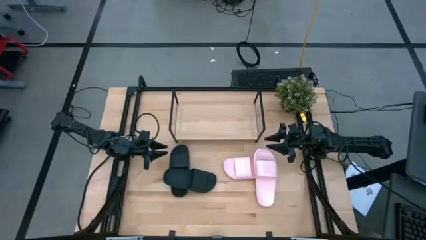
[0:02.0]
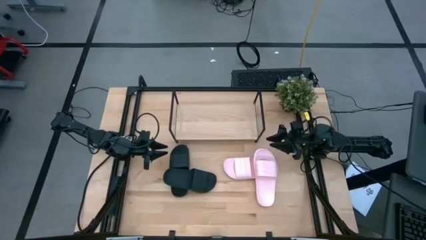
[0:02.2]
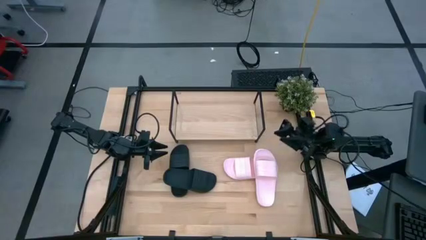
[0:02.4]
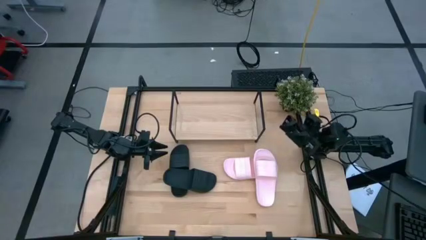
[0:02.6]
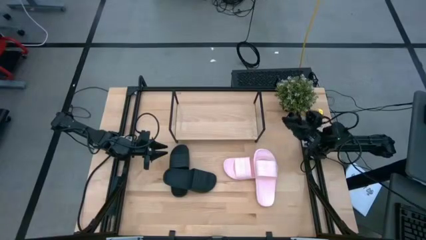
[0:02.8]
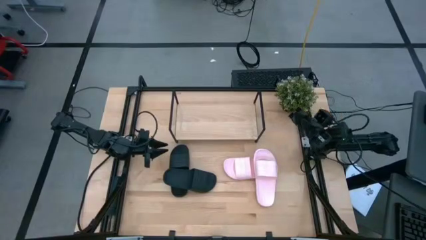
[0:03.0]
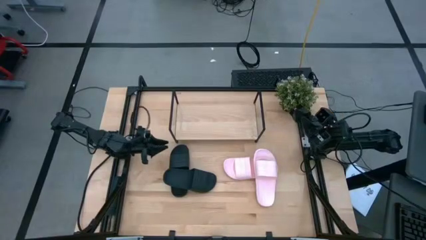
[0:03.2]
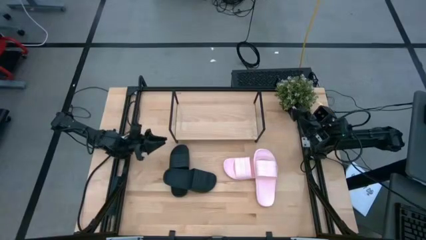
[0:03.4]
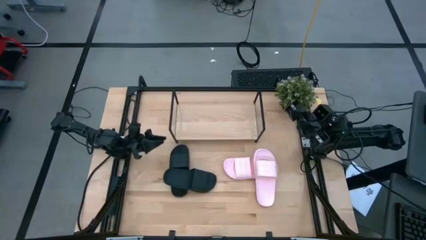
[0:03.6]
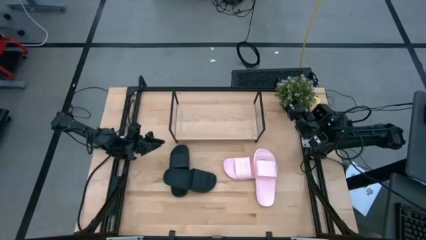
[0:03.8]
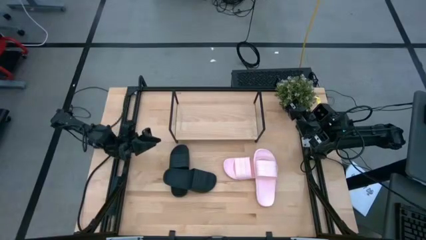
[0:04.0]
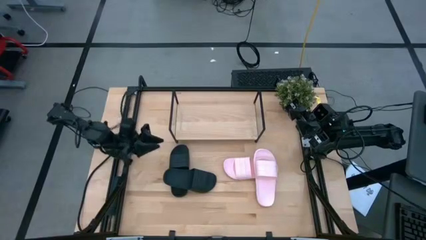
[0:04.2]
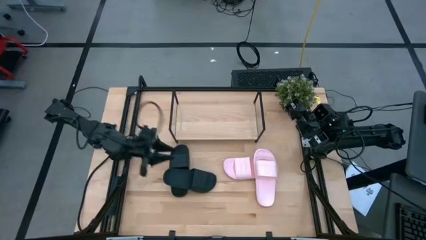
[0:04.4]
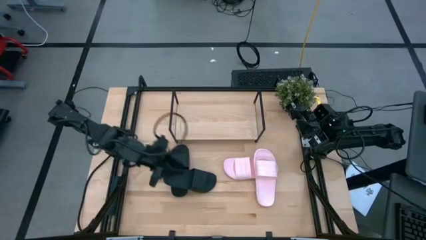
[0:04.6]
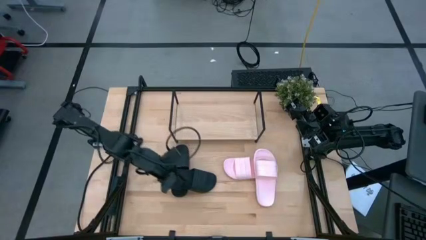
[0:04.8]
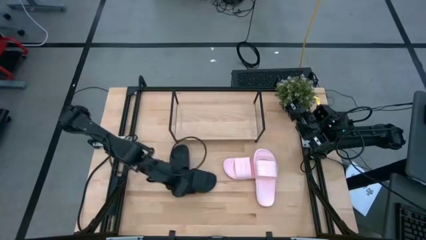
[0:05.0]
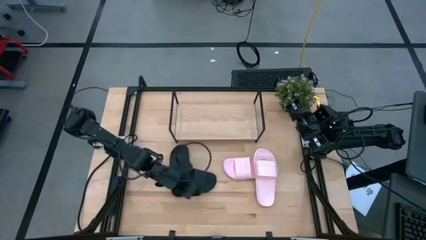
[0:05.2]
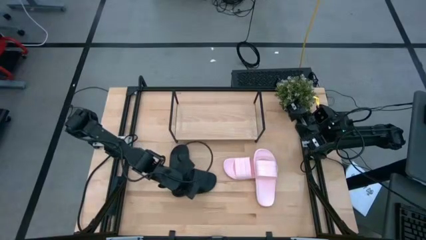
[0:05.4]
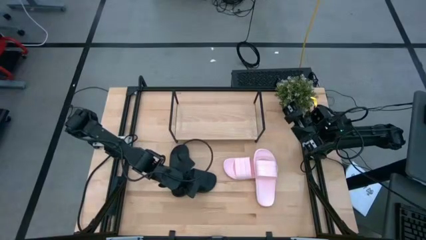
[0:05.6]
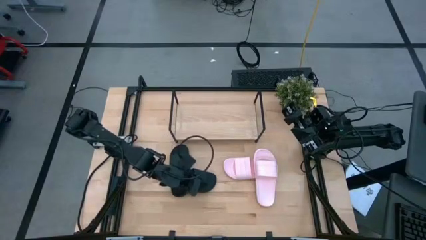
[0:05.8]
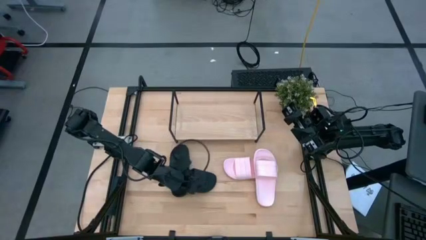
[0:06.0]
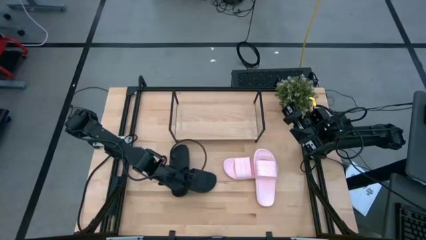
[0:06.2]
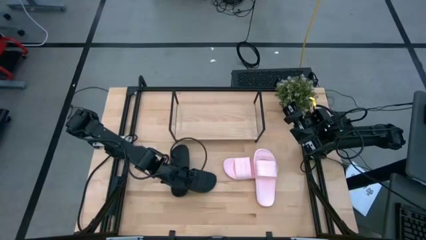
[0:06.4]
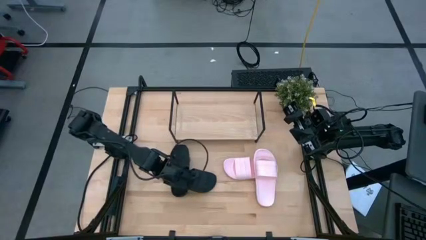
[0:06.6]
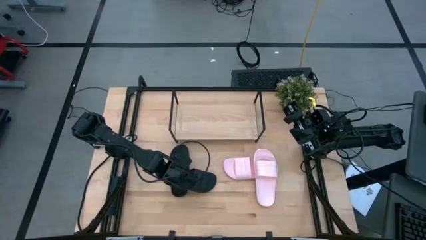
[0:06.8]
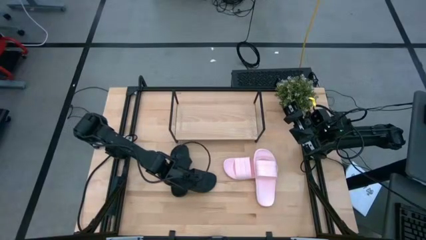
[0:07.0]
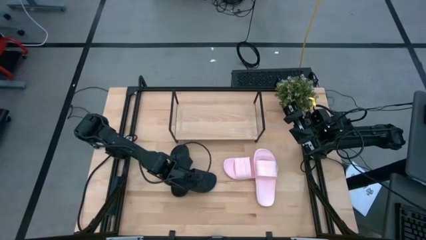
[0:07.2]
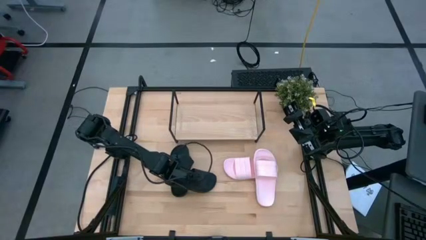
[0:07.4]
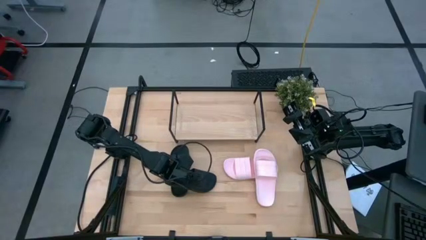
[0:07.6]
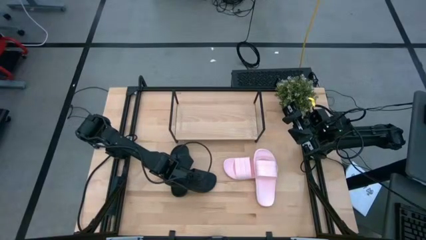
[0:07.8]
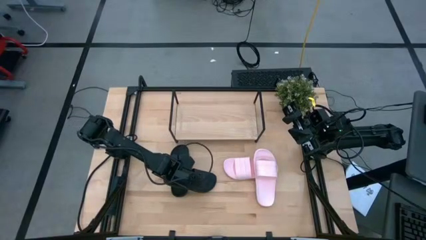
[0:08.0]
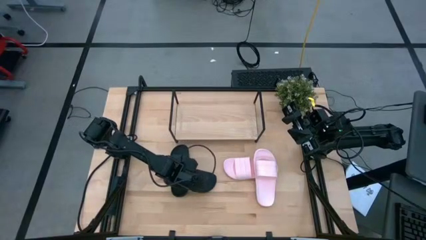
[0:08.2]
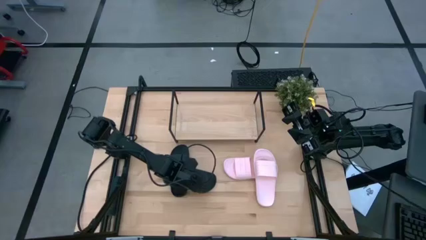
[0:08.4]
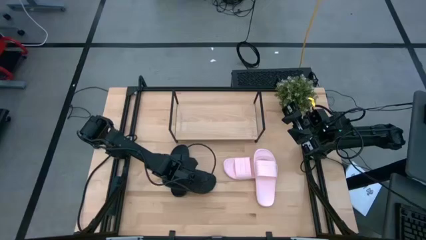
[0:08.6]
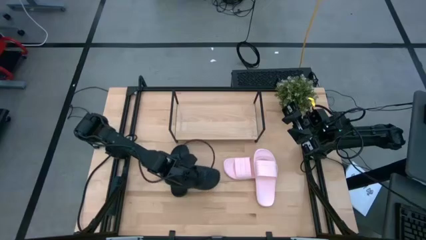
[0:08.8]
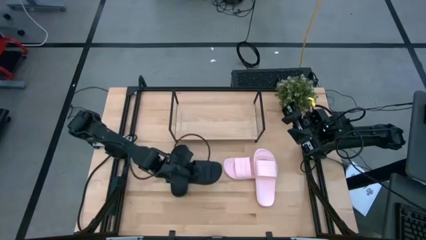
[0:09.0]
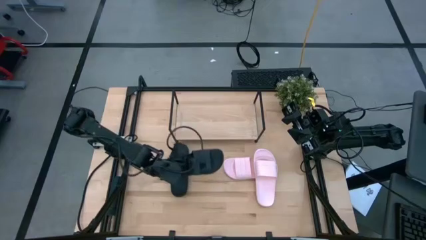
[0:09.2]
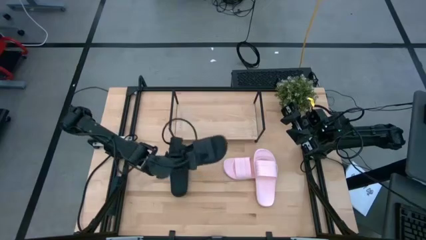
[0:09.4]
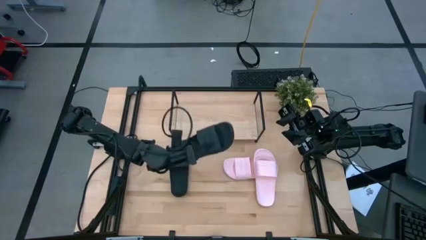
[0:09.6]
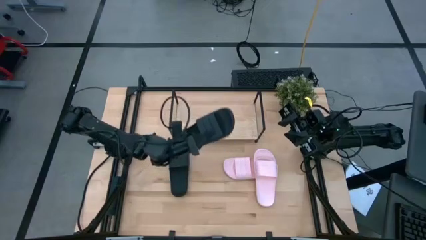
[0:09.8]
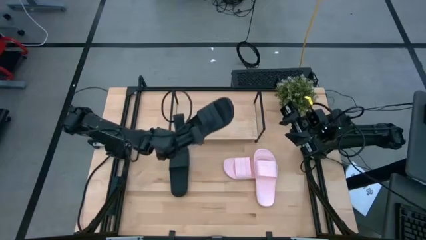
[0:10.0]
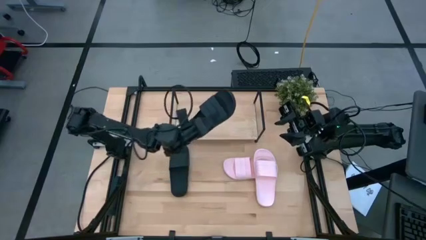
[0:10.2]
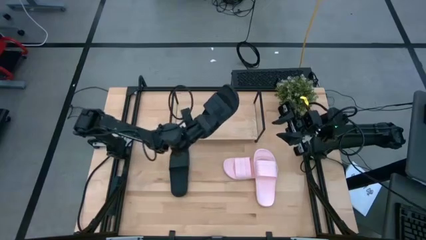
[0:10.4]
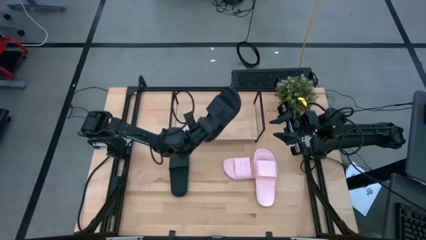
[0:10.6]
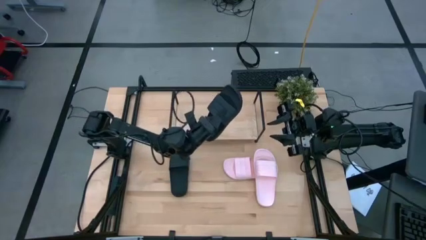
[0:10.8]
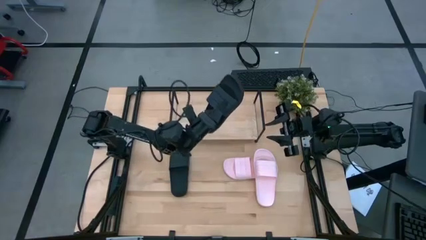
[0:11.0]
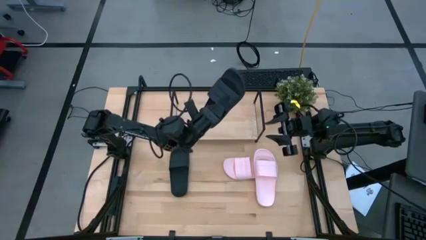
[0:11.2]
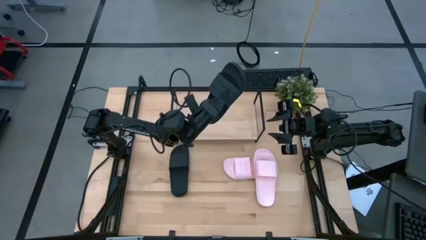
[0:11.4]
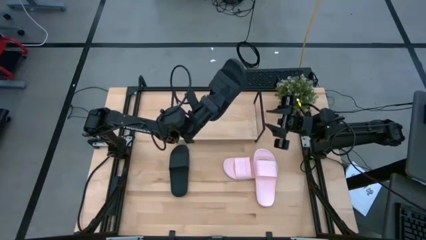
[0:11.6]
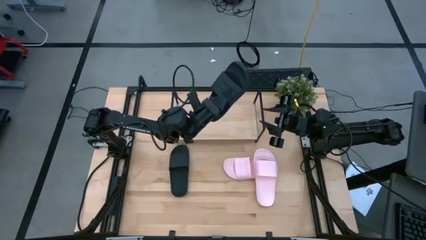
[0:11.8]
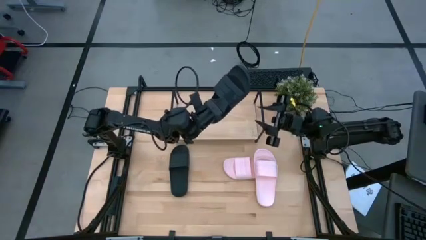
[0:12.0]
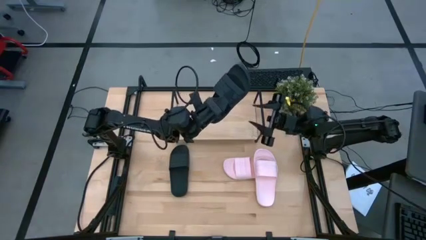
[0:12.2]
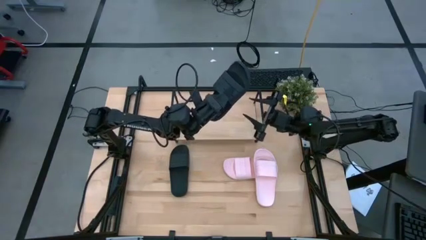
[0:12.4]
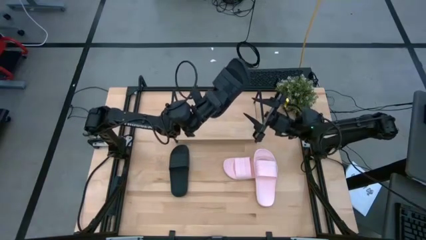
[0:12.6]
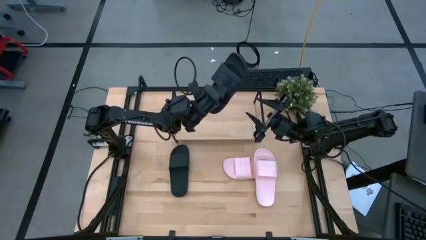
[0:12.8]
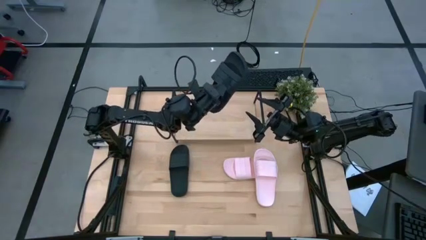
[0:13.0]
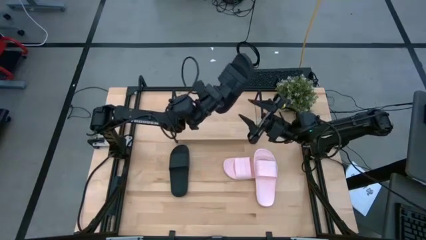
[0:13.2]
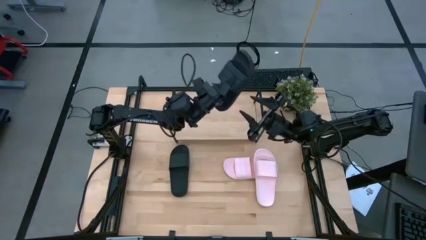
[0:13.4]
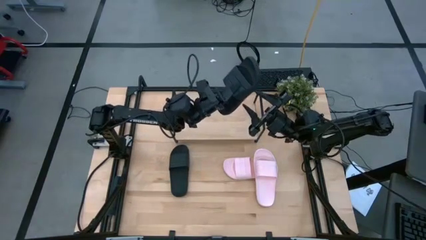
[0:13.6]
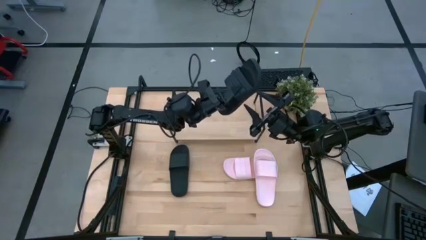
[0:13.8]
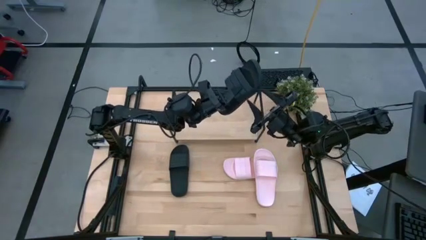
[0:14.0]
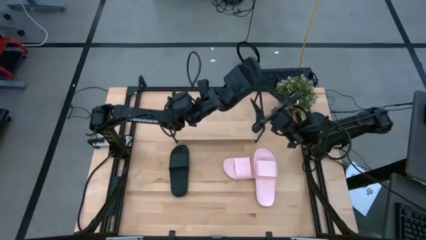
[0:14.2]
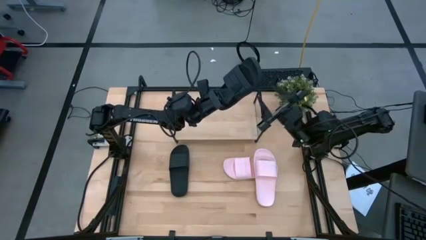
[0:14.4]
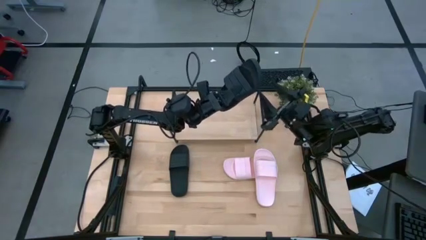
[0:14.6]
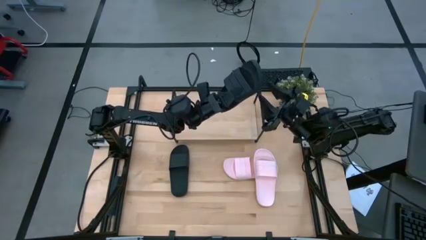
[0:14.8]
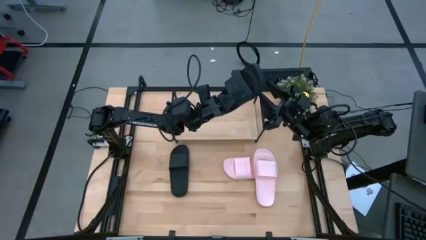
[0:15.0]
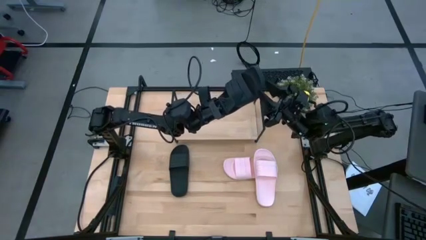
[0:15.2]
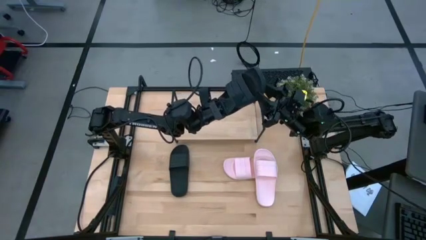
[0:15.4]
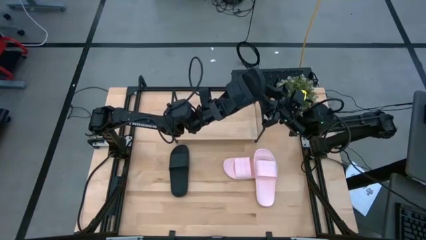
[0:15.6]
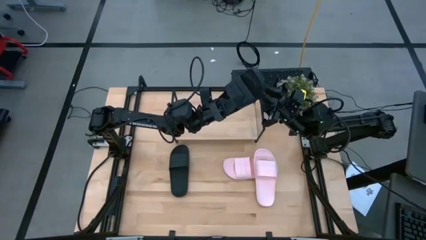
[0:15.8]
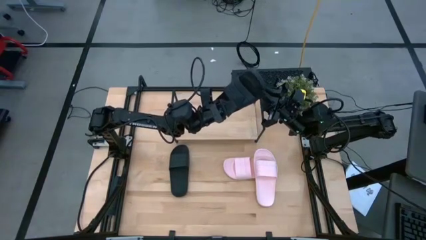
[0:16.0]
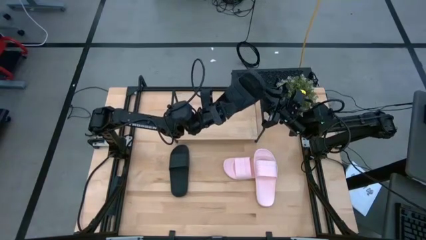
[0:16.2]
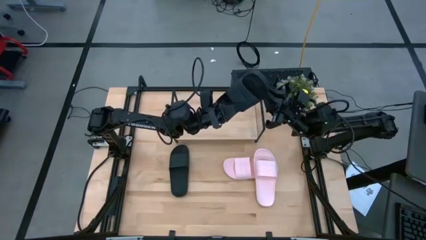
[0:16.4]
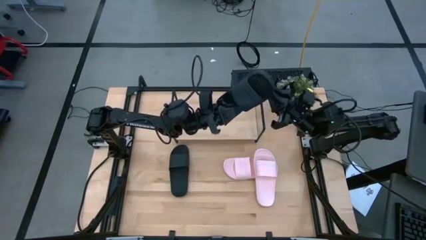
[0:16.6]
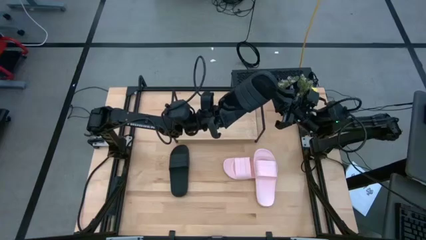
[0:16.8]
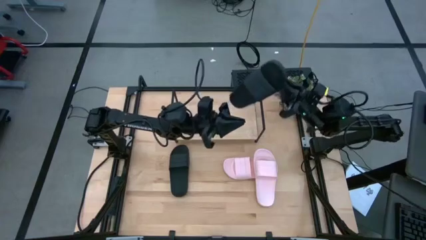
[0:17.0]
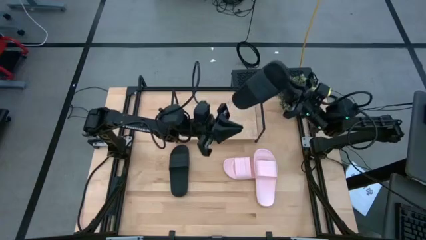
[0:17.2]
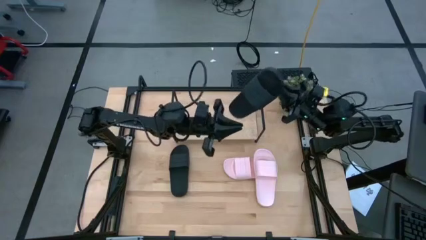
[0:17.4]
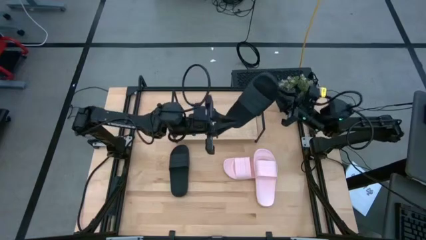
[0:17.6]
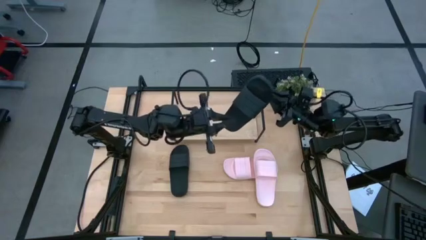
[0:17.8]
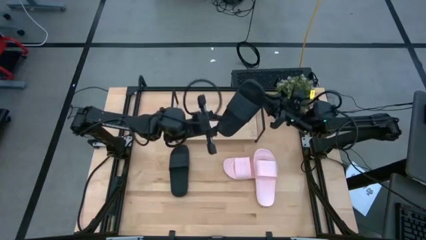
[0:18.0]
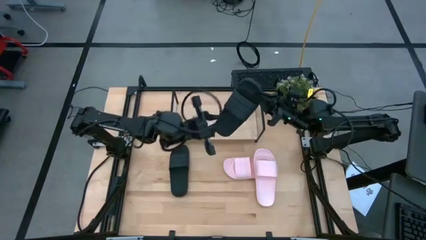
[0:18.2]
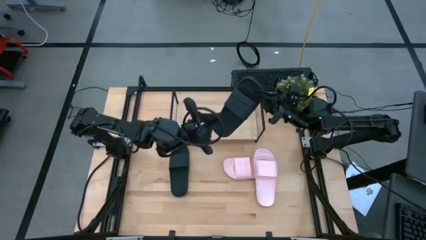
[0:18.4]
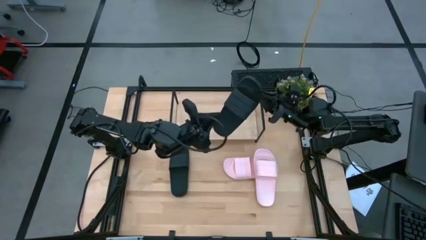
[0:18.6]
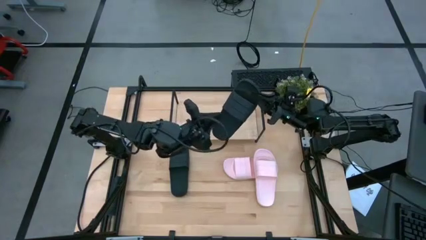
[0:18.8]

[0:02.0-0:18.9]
Task: Pick and place slides into the shelf
Put the right black slide on the shelf
